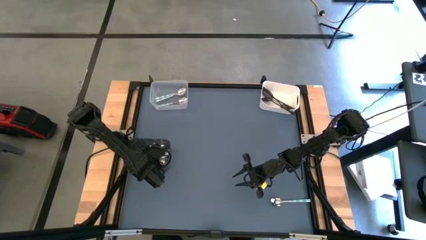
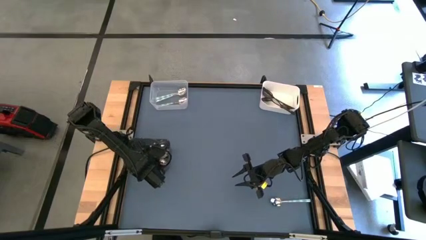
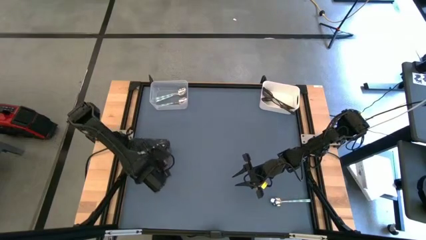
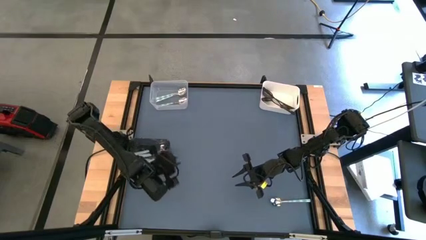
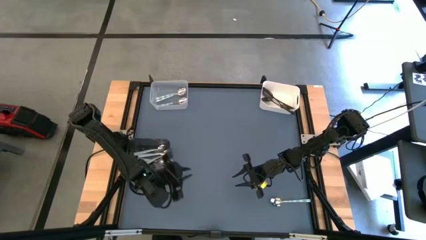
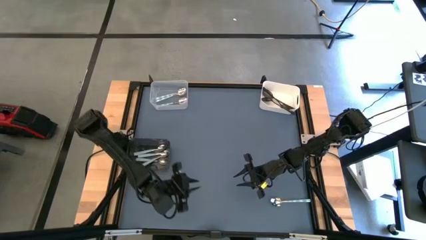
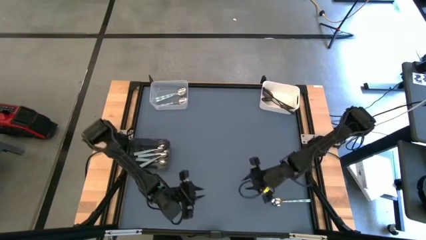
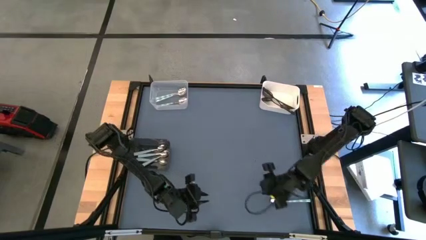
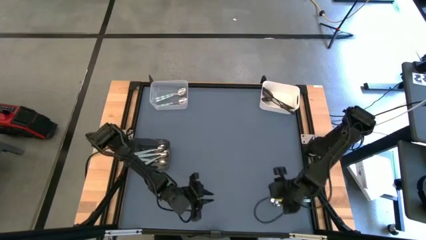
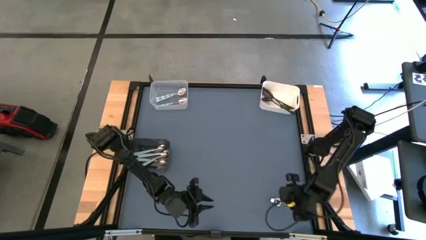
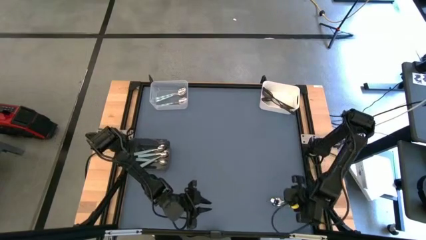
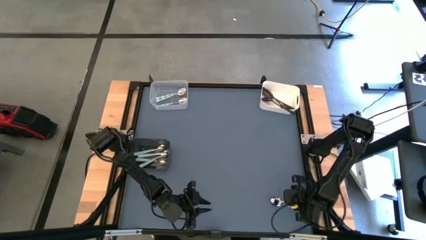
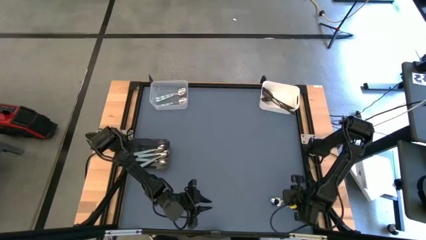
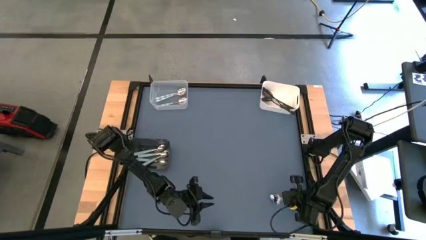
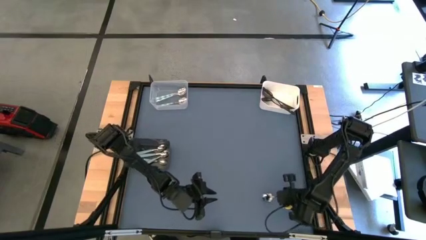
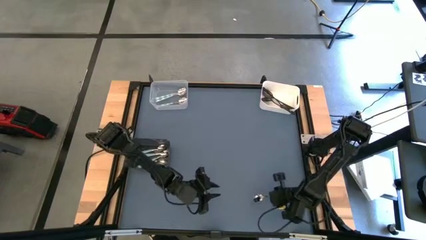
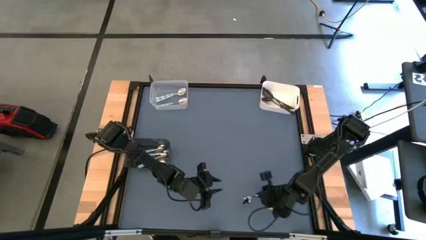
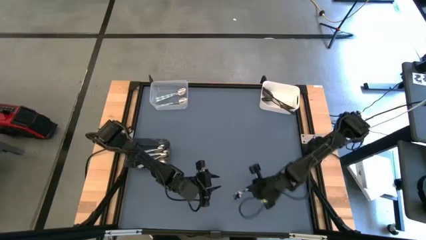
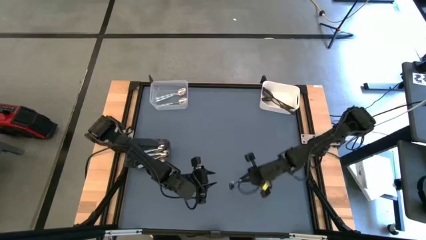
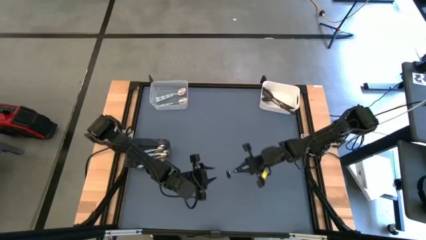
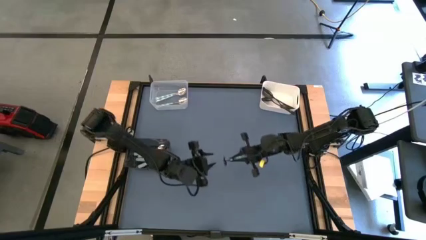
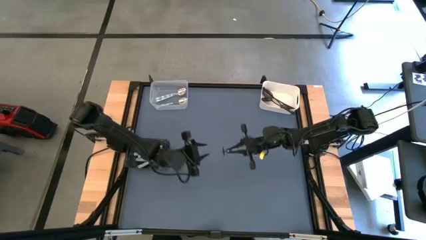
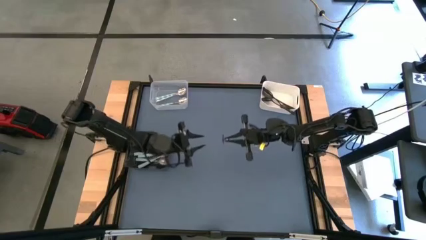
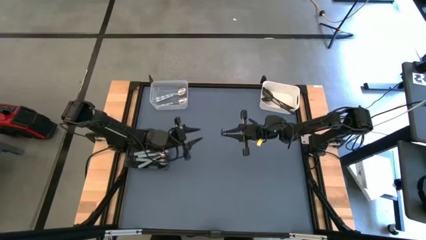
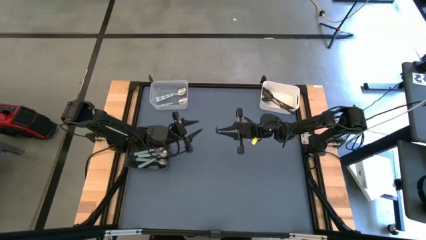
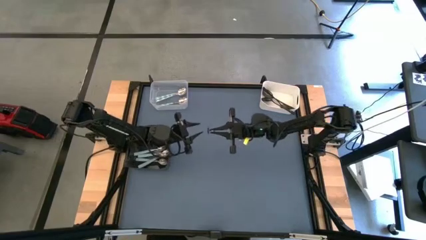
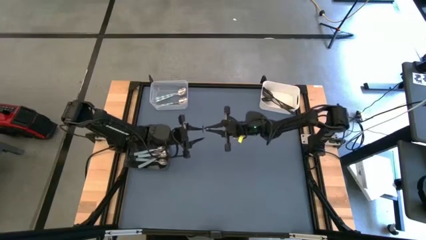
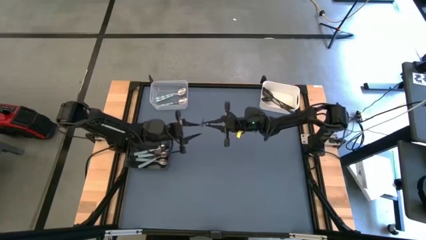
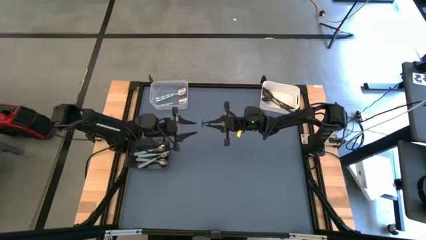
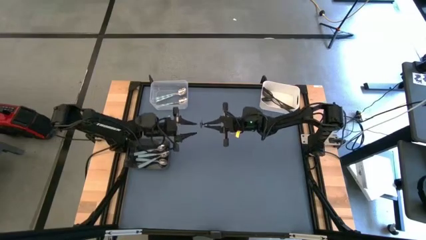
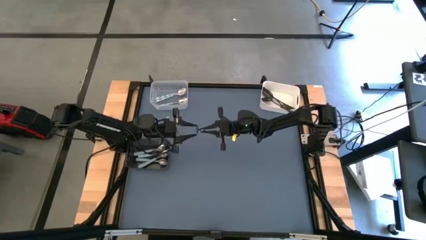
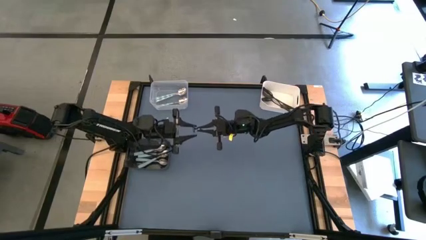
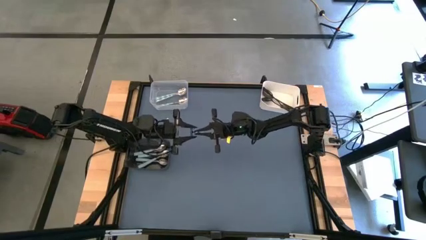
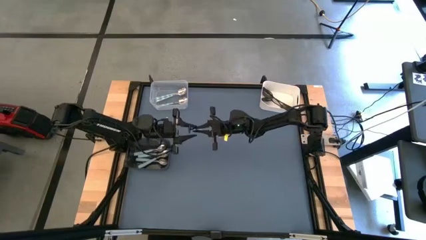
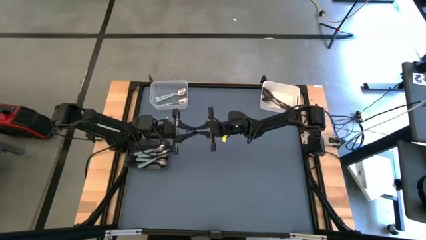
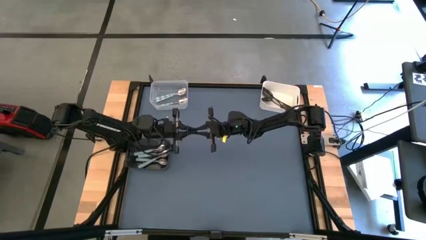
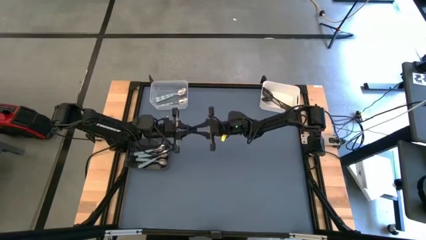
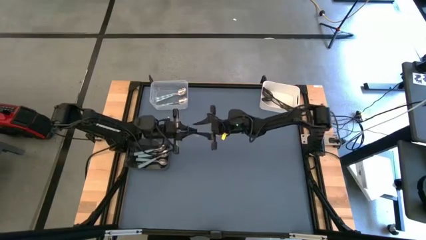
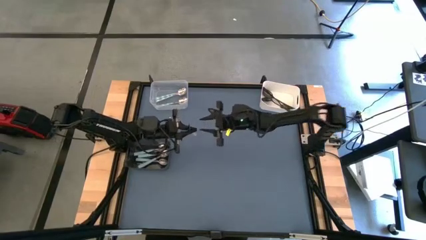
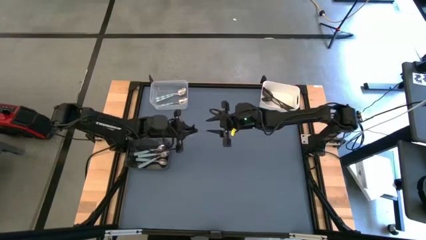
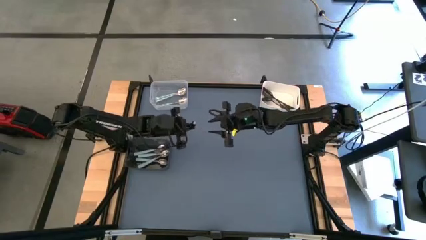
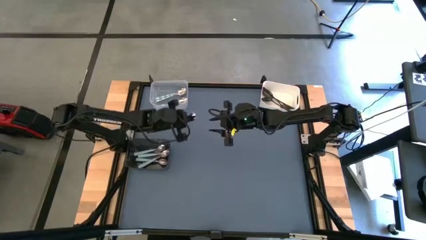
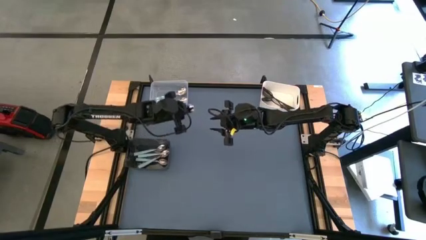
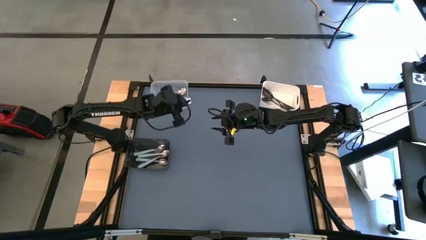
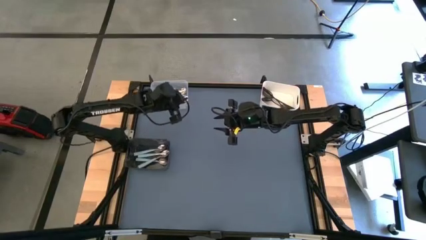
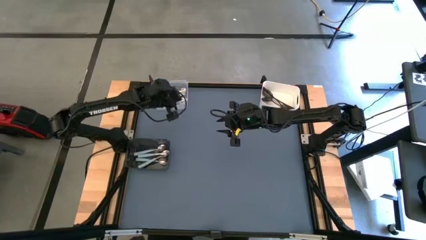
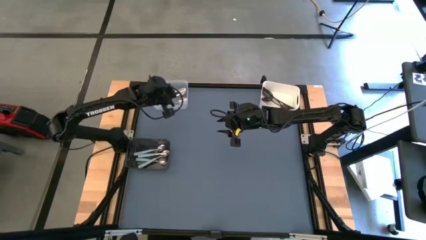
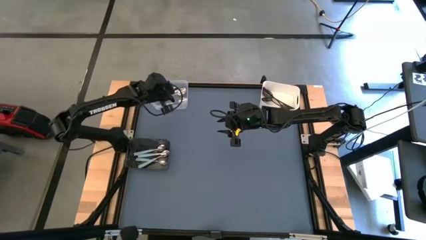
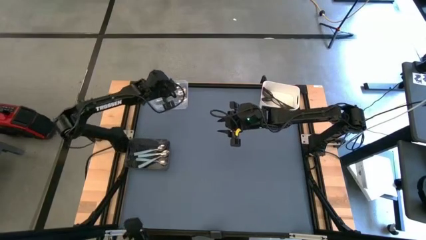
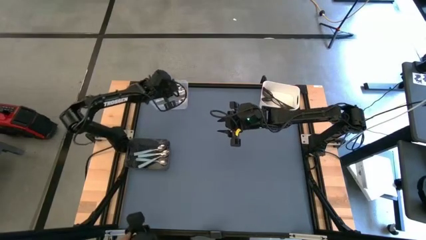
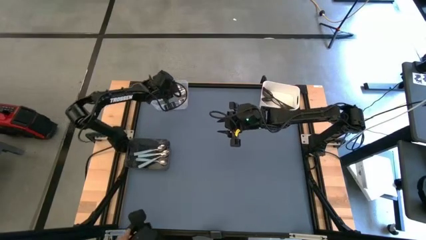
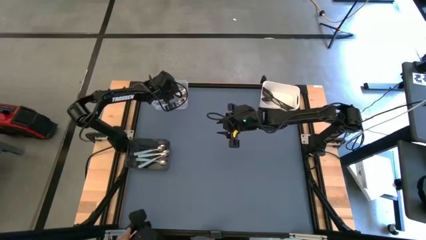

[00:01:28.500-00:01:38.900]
Task: Sort silverware by color (type)
Put the green spoon into the transparent bin

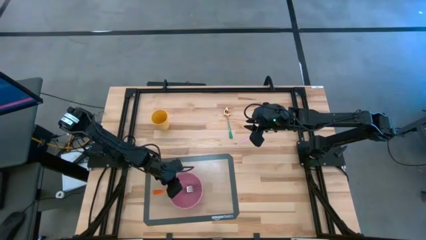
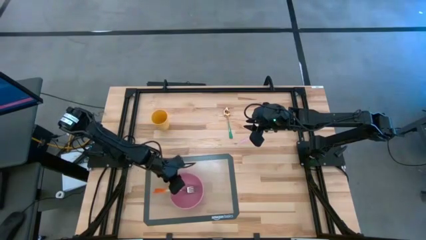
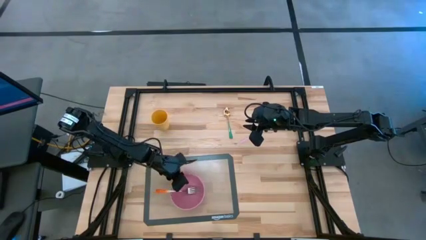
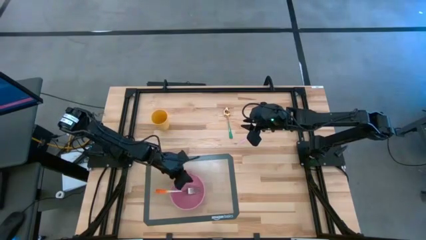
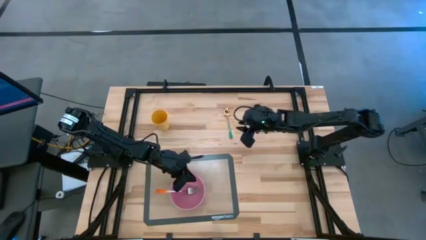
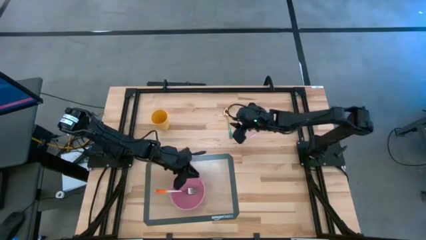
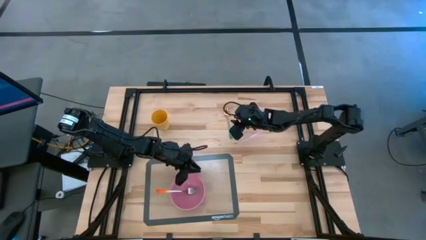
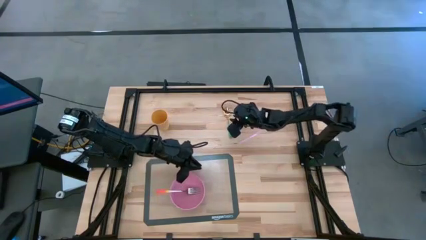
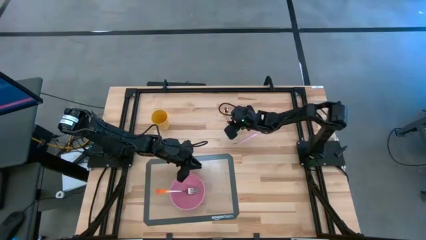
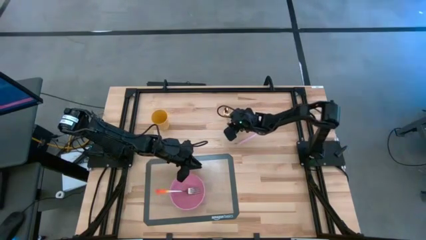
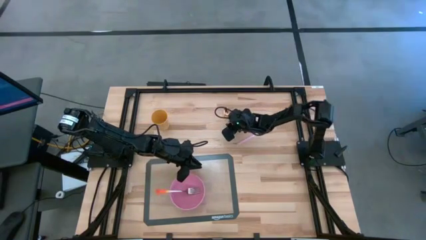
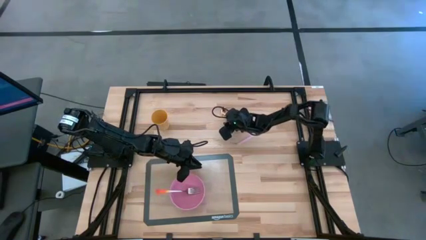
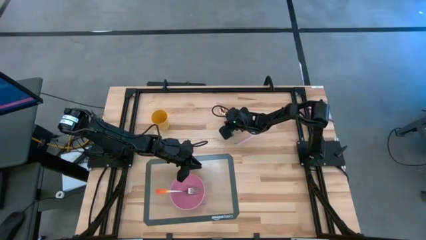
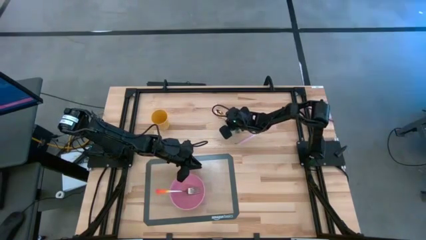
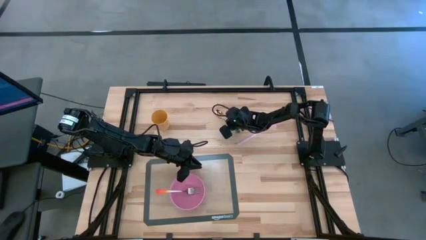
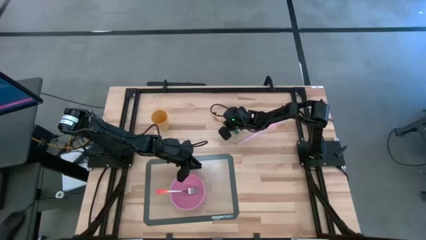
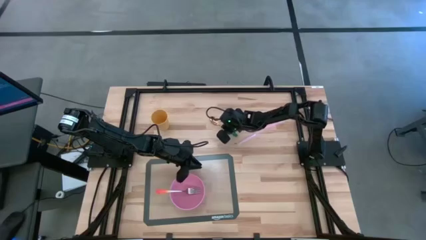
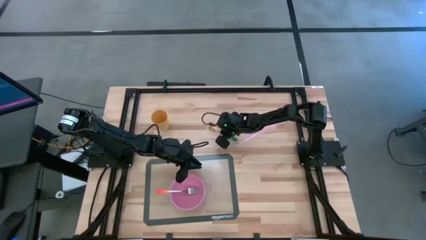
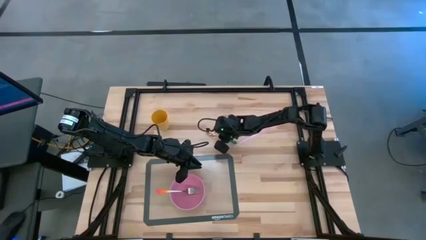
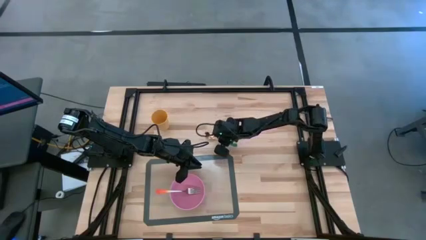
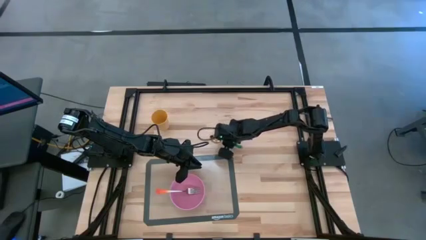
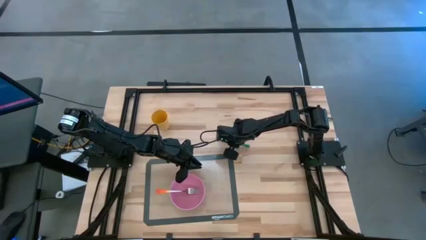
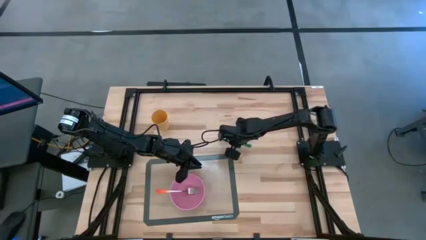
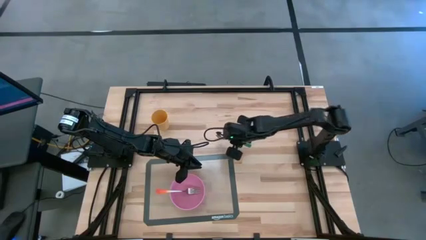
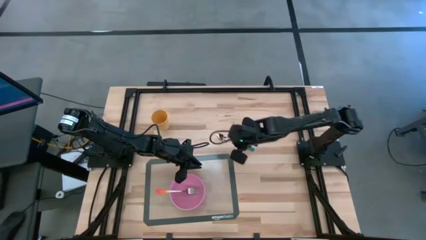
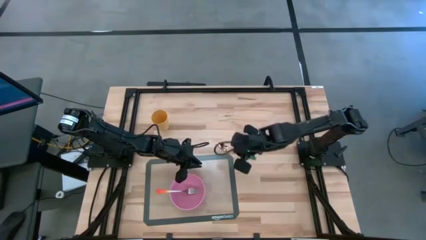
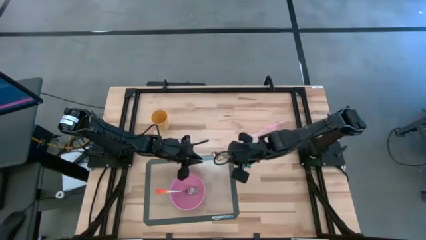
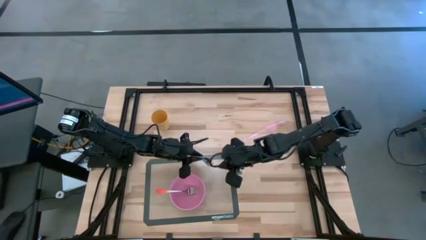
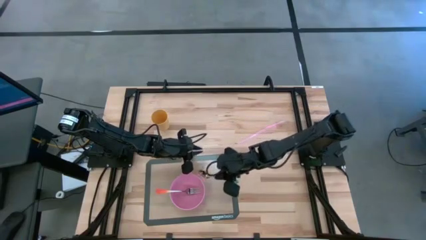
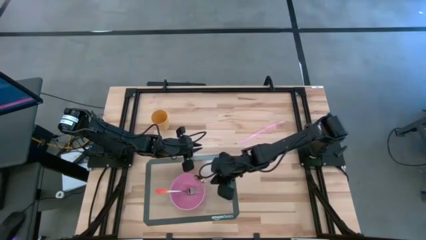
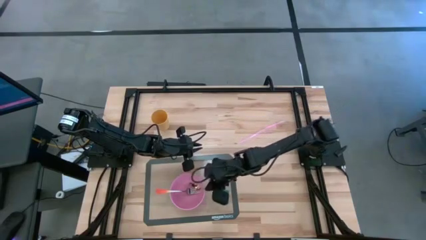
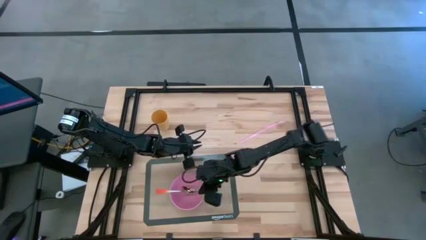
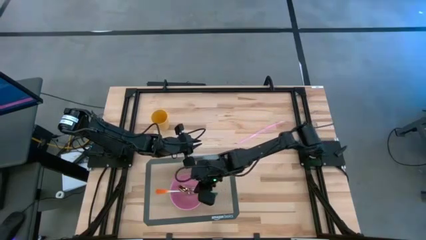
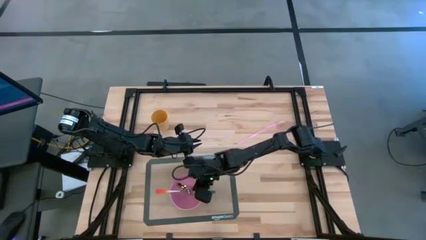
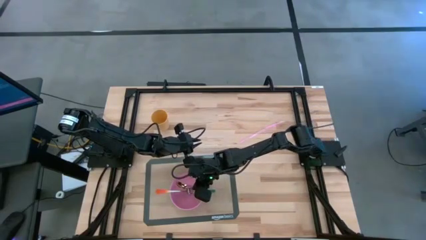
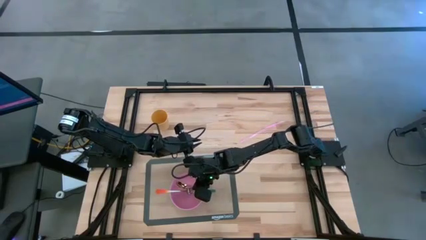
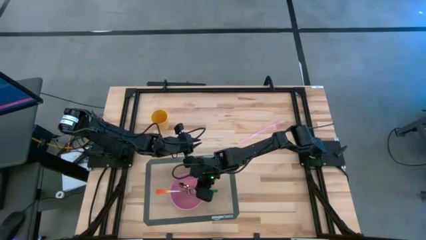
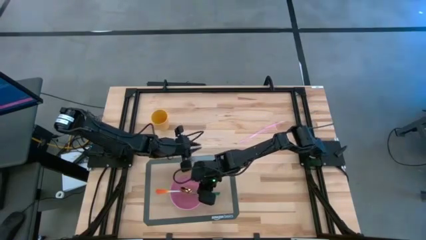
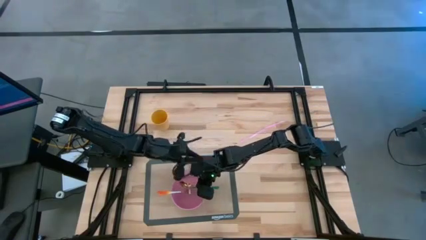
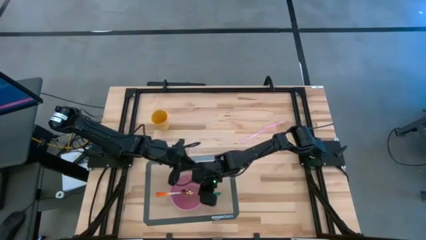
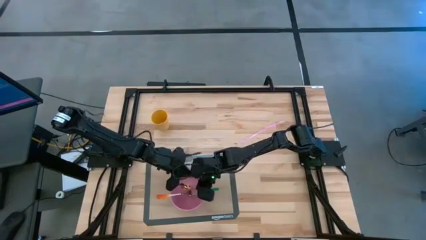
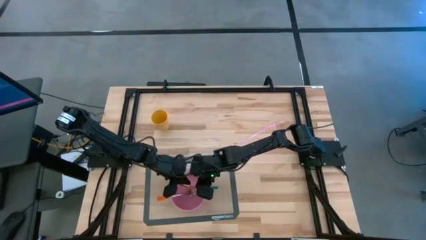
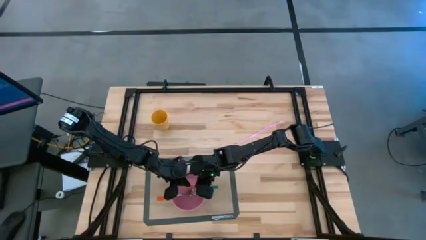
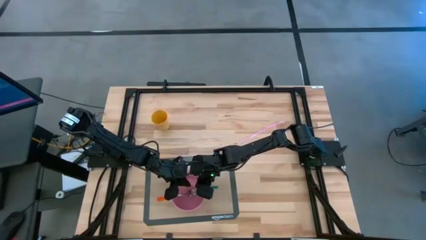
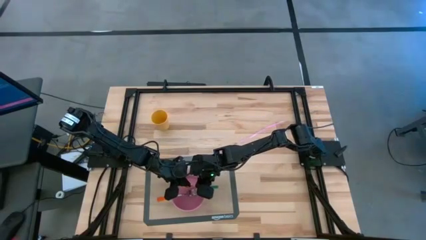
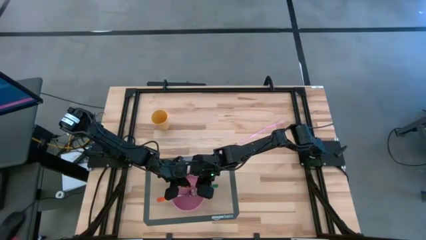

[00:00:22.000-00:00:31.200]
Task: Pick & Place Utensil
Put the green spoon into the pink bowl on the transparent mat
